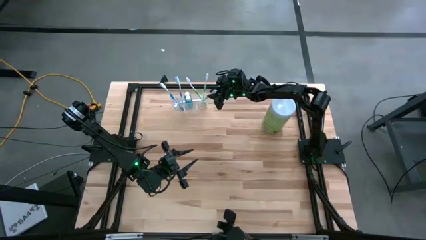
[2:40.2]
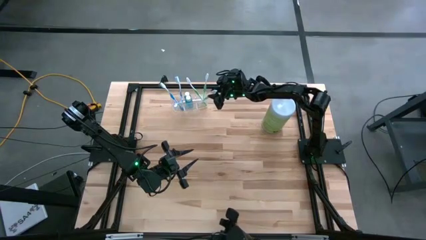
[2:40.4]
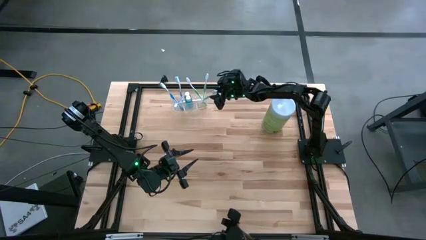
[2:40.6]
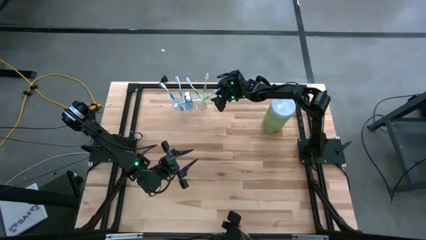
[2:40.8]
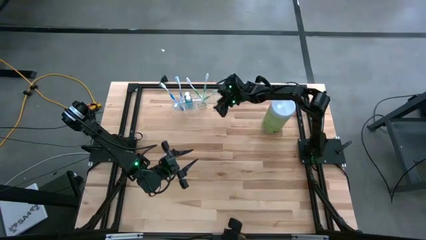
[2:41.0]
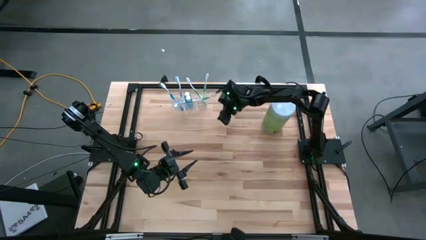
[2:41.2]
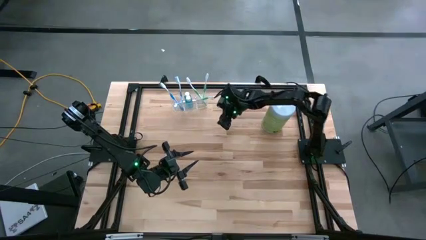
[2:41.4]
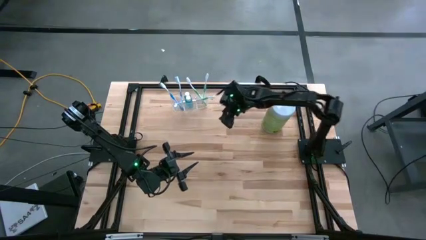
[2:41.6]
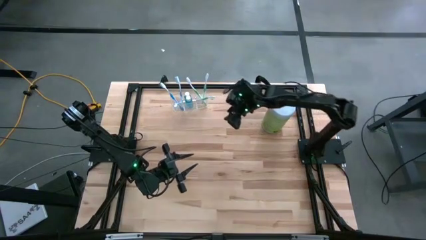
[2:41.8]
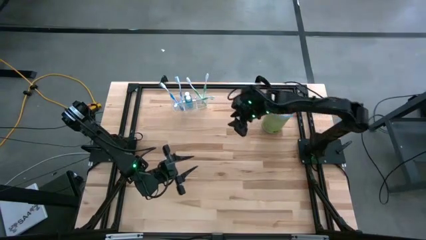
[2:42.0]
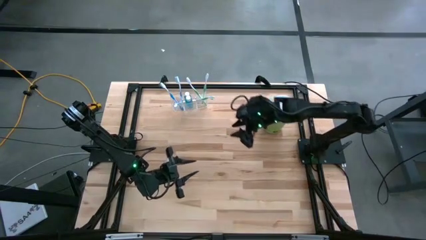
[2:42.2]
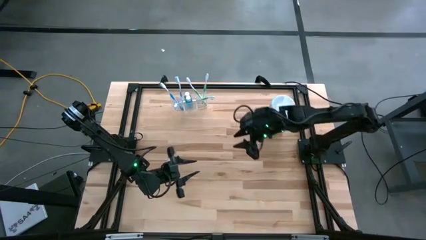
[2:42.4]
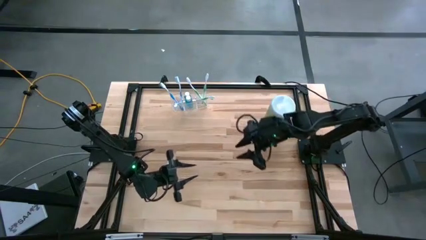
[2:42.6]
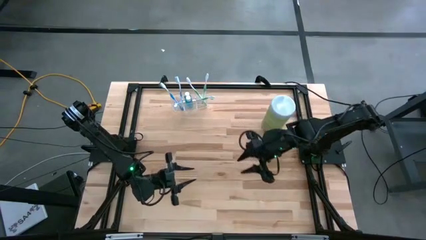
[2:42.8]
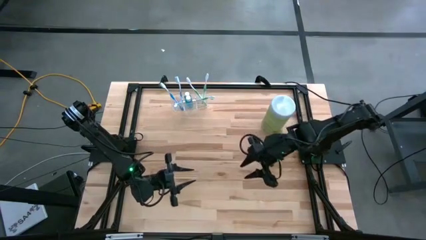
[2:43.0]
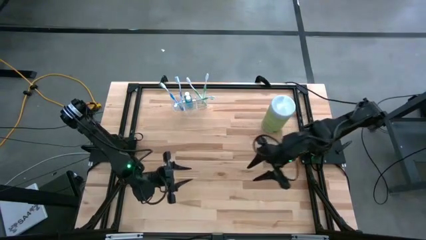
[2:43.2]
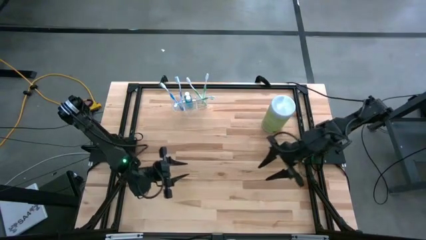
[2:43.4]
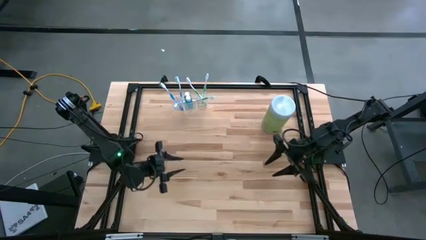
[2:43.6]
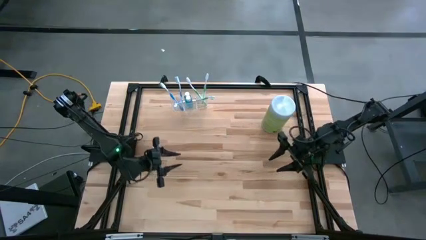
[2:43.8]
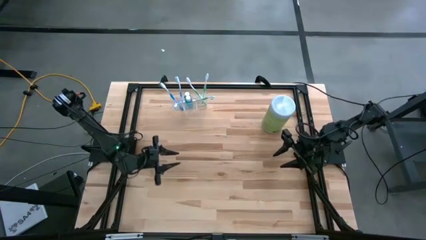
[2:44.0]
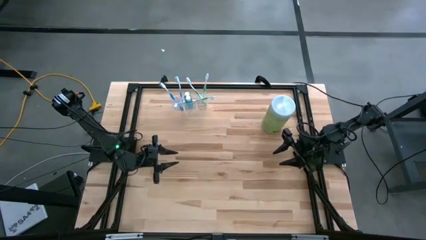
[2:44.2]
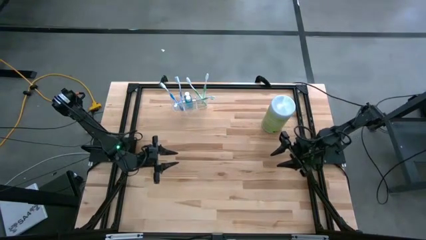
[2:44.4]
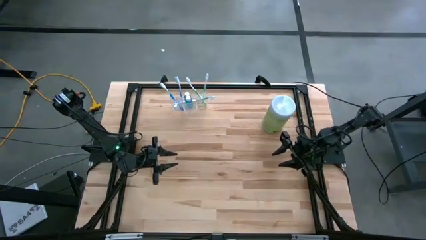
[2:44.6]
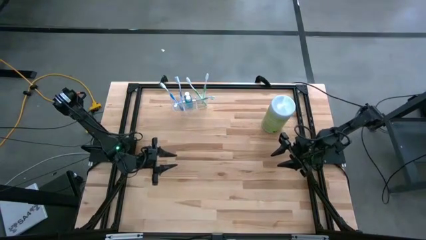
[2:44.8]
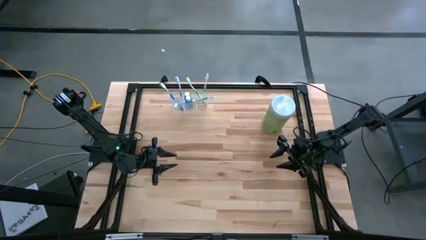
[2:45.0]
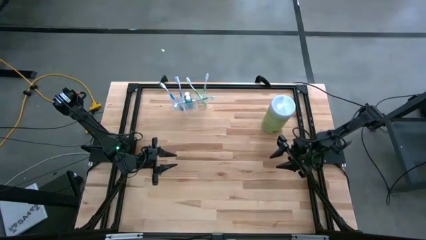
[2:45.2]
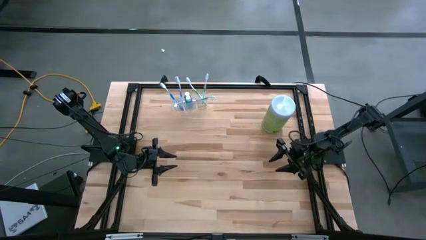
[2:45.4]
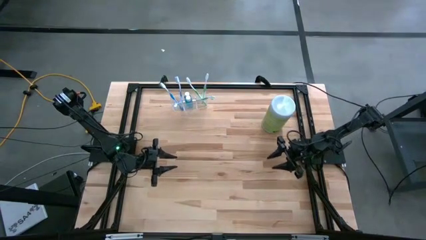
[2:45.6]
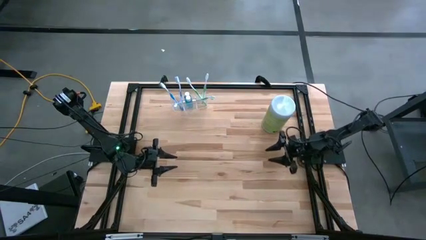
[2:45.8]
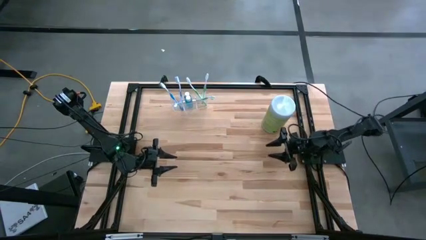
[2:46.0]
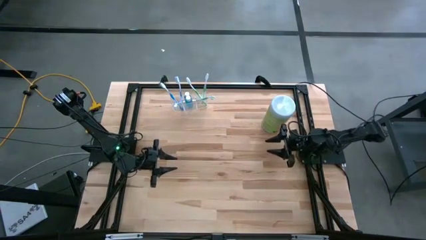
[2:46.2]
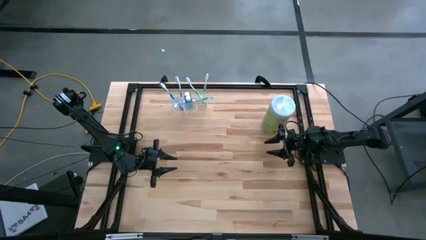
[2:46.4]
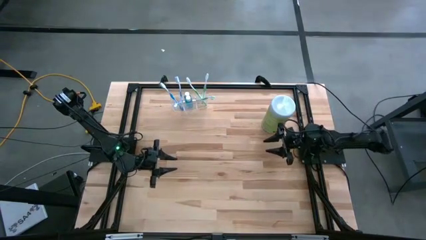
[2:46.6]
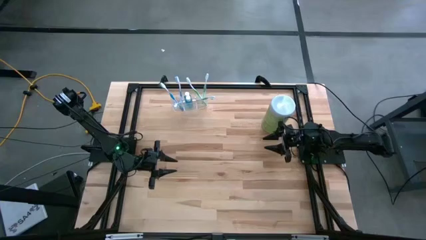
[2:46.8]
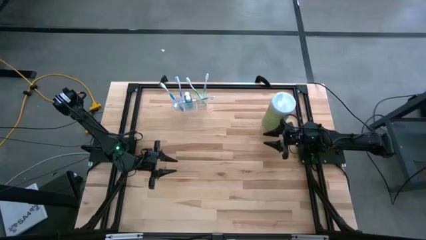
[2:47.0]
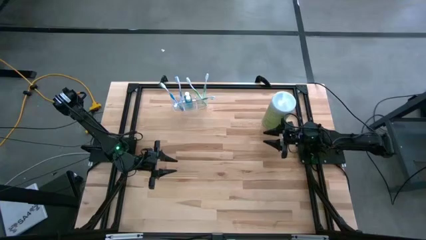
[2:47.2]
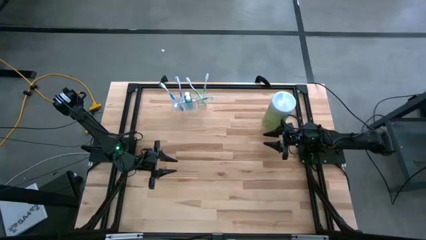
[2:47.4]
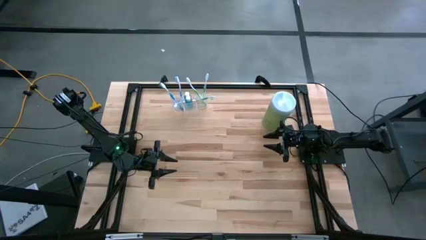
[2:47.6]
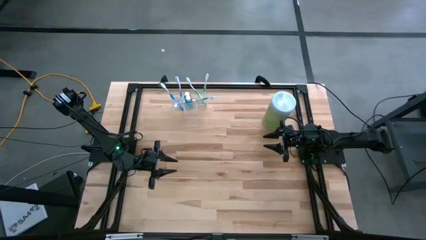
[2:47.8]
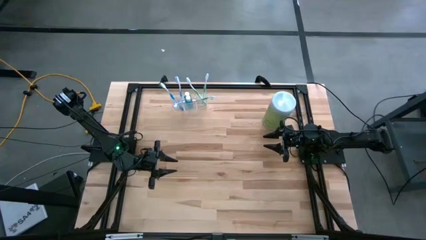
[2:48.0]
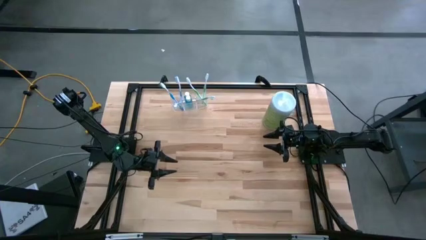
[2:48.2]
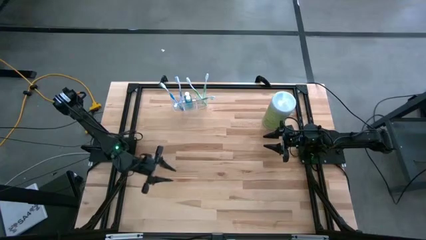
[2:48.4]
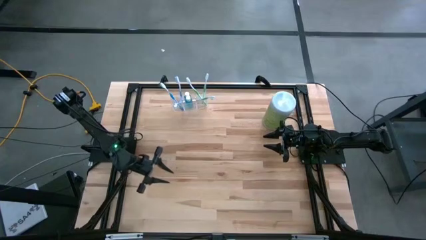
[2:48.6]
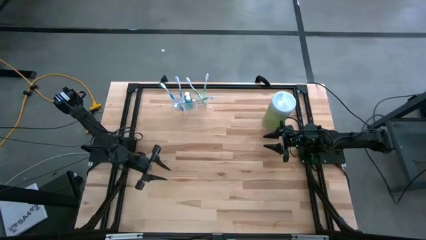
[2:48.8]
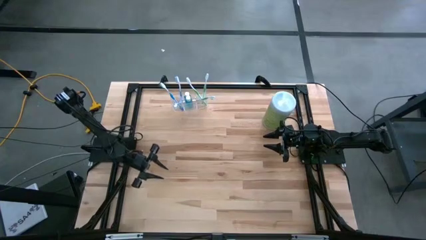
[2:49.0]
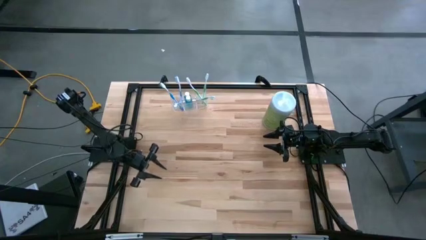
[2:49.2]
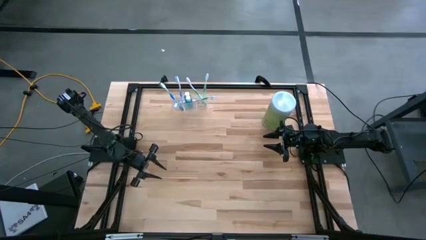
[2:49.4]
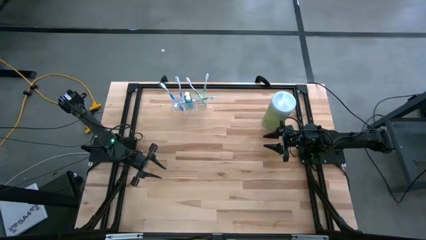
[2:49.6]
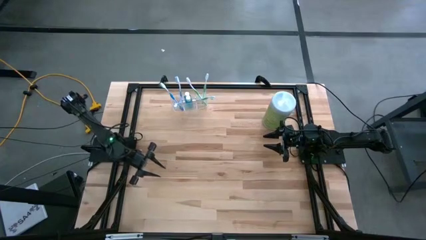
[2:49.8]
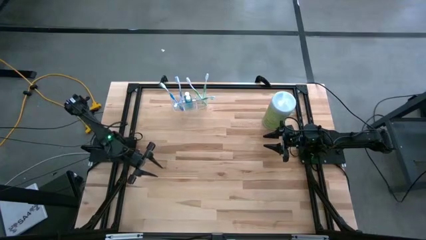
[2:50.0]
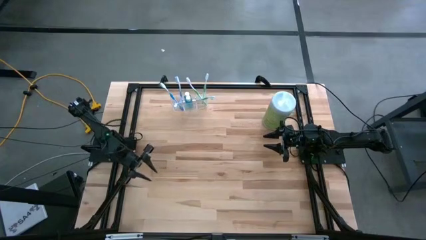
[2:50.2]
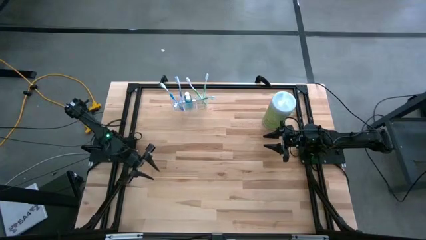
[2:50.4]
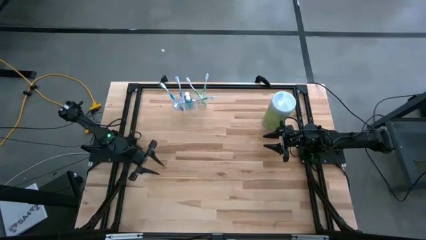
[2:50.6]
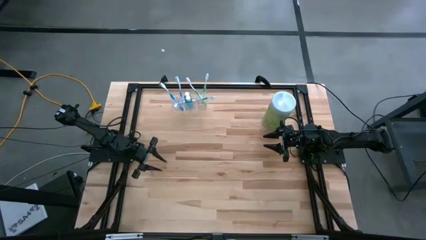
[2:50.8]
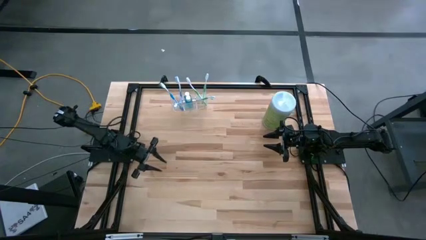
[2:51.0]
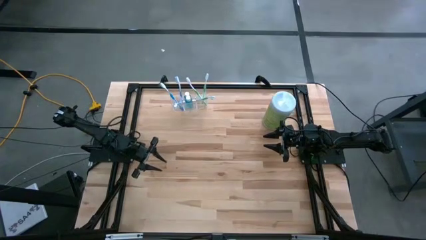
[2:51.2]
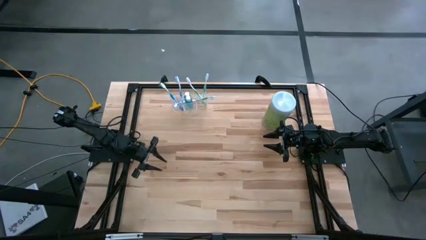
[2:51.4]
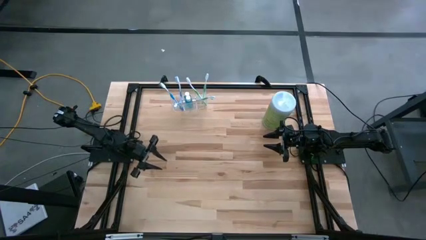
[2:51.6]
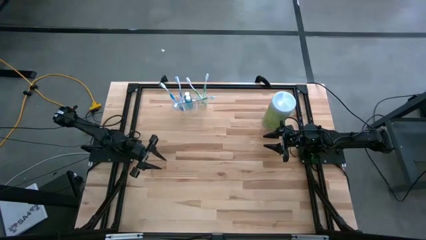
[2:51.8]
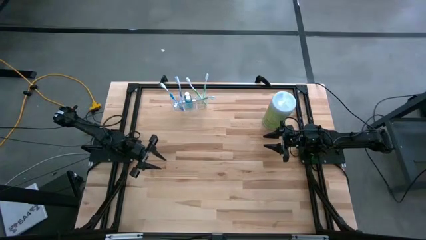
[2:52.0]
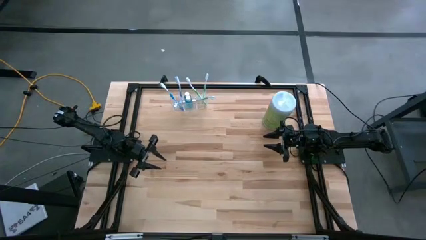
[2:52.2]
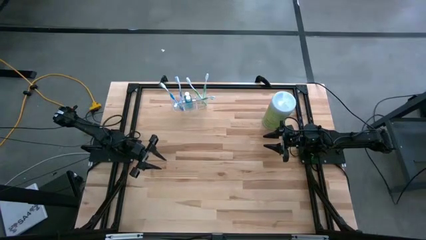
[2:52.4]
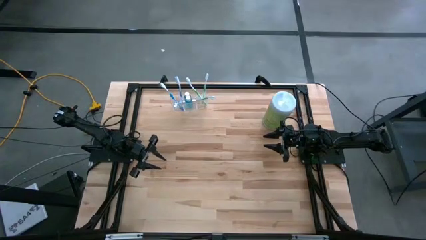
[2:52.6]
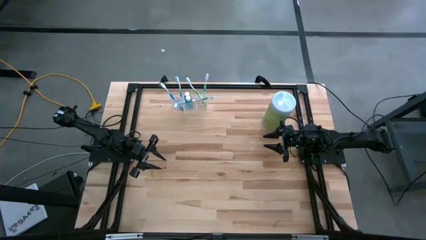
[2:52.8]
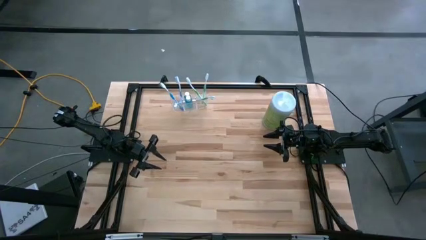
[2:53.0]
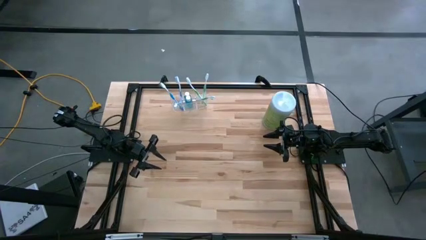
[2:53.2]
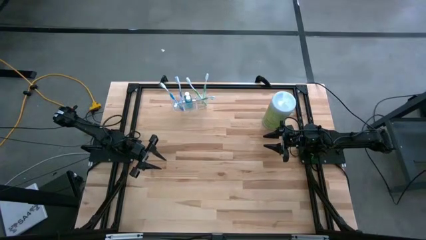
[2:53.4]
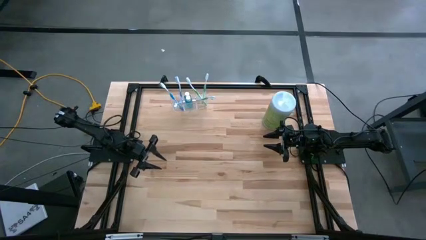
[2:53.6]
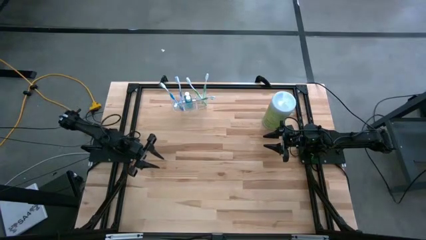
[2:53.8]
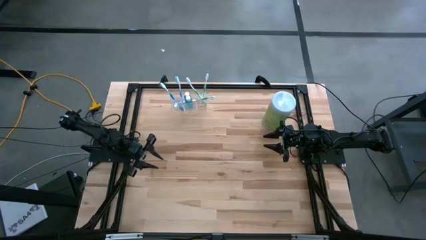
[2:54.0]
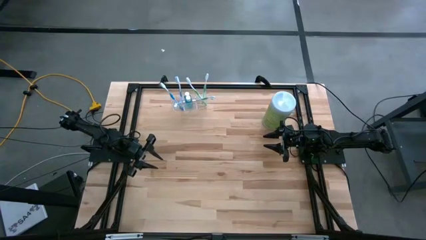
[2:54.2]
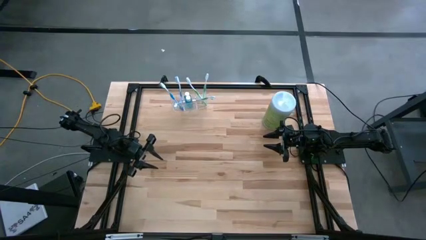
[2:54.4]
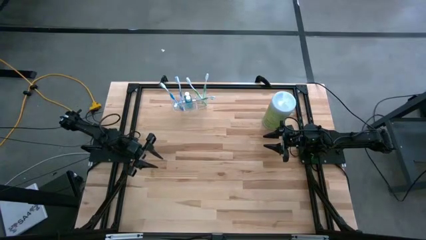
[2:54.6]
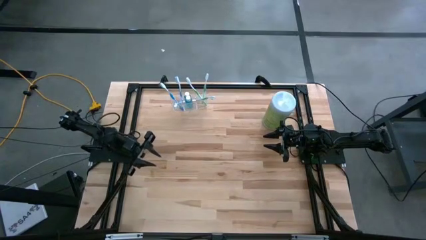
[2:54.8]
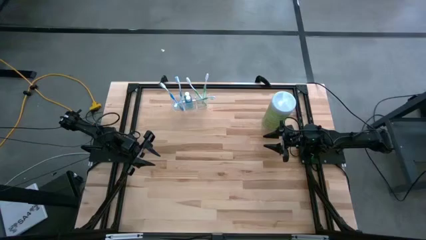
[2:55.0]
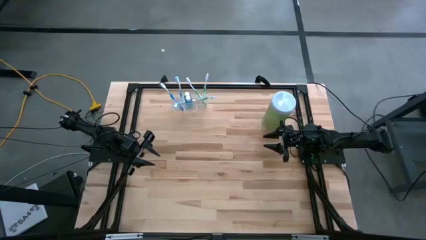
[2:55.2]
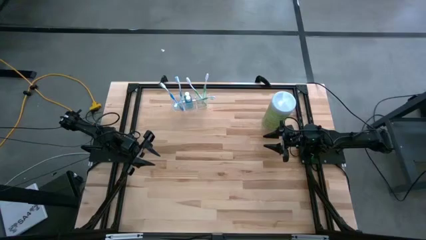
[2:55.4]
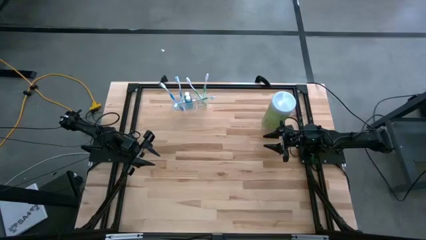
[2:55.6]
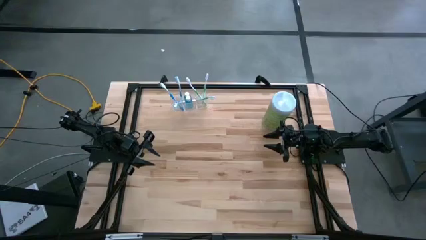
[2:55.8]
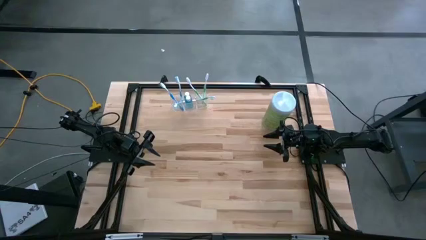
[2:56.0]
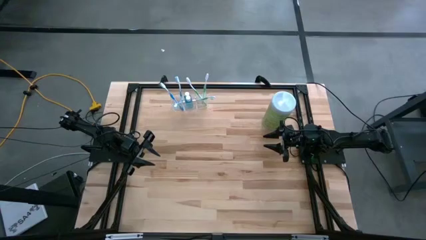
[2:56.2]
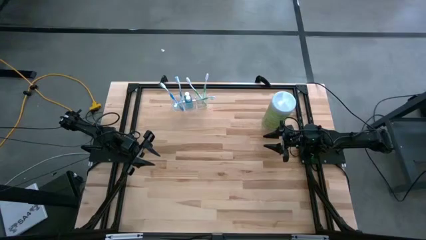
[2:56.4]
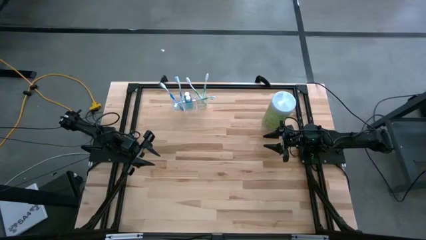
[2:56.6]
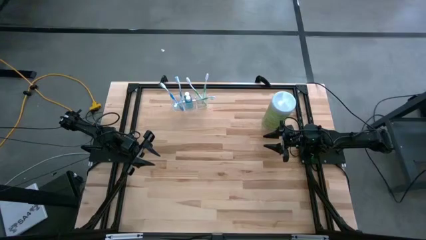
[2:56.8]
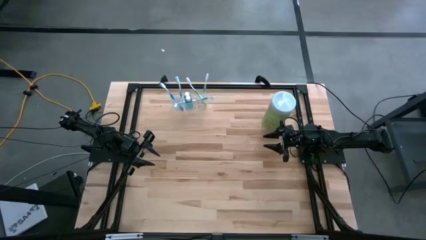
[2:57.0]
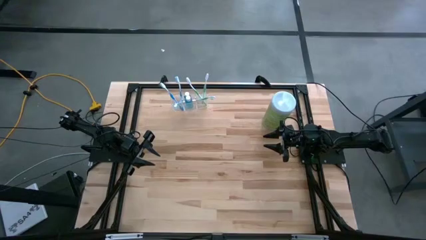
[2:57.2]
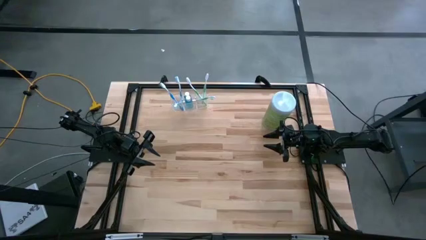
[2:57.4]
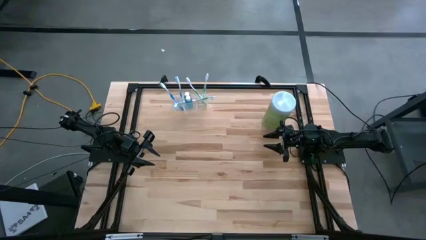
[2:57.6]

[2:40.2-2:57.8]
Task: Pick & Place toothbrushing station
Return to Home Position
